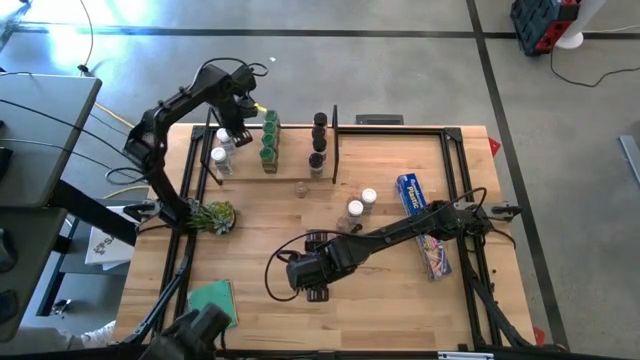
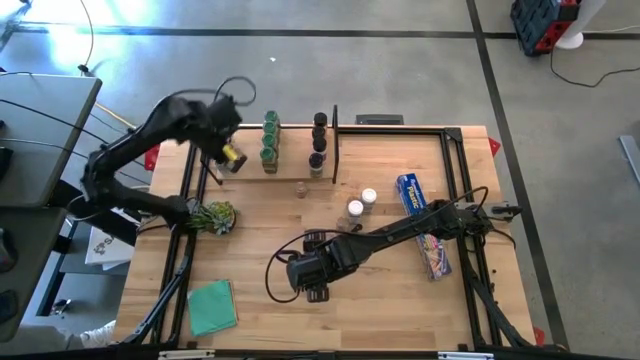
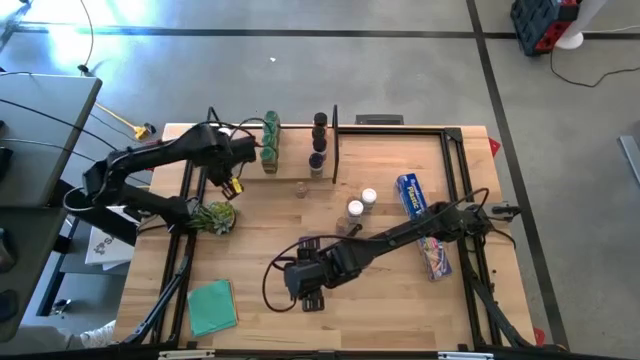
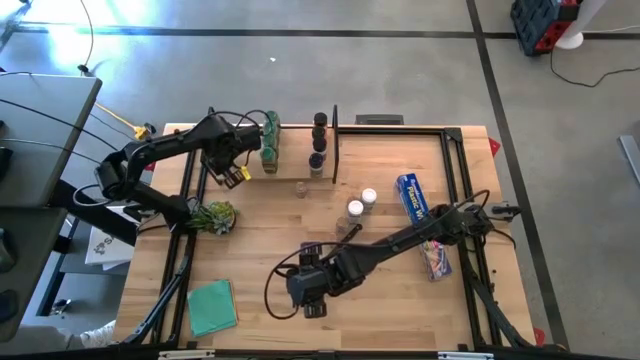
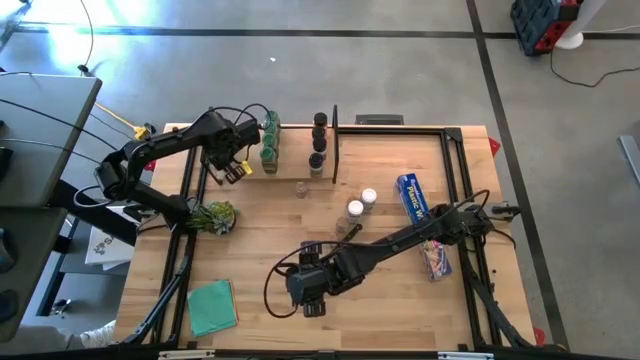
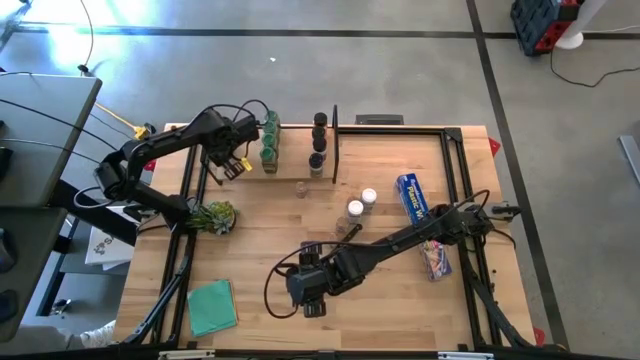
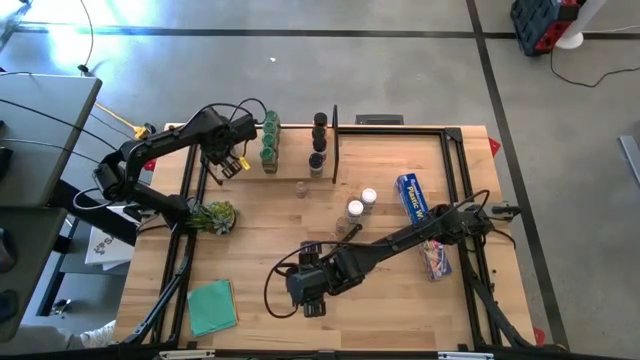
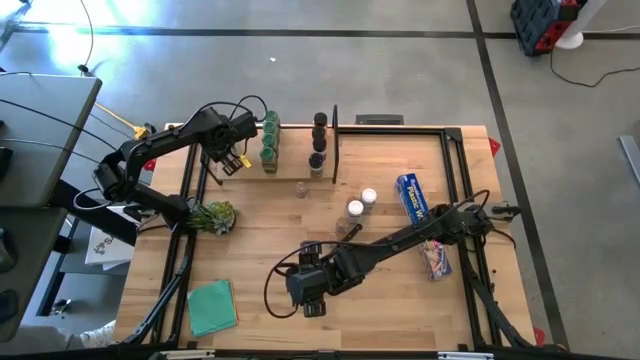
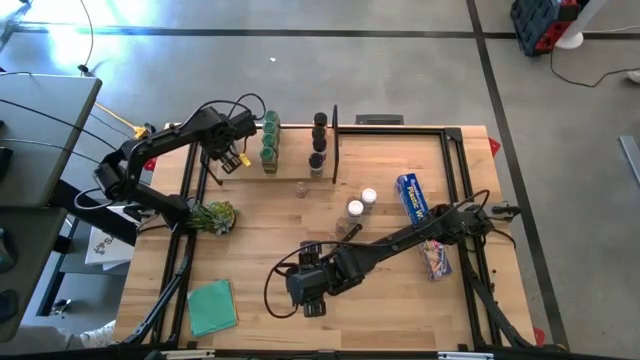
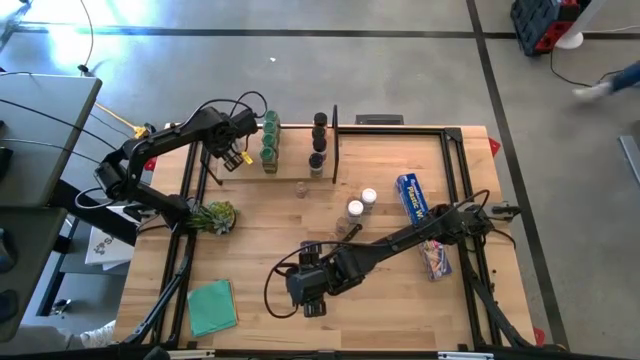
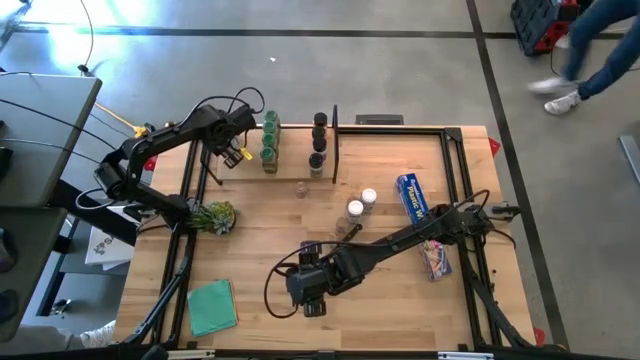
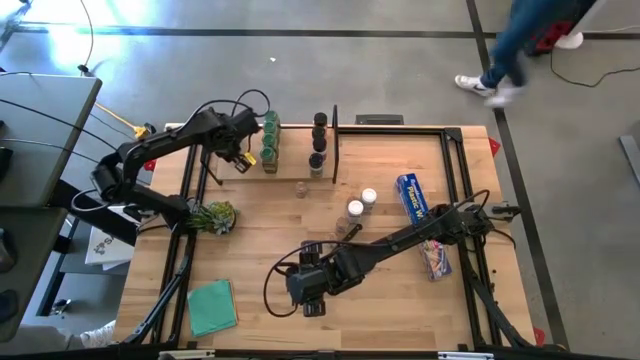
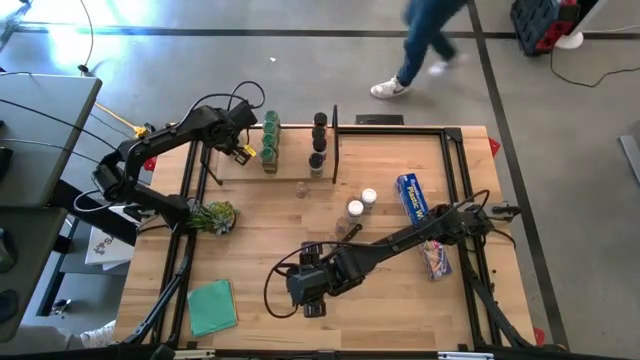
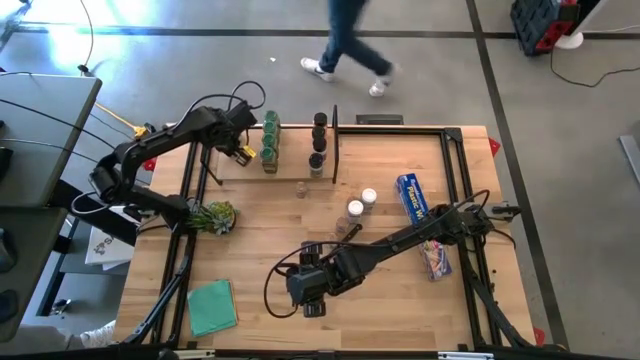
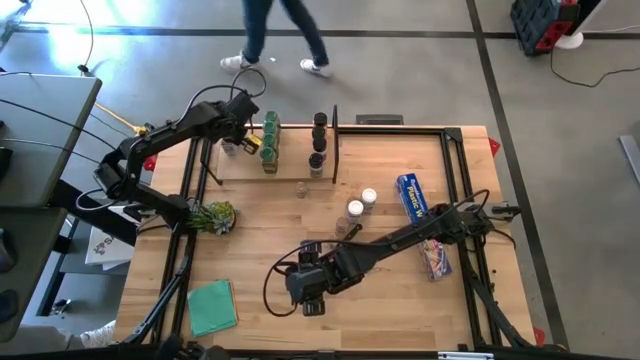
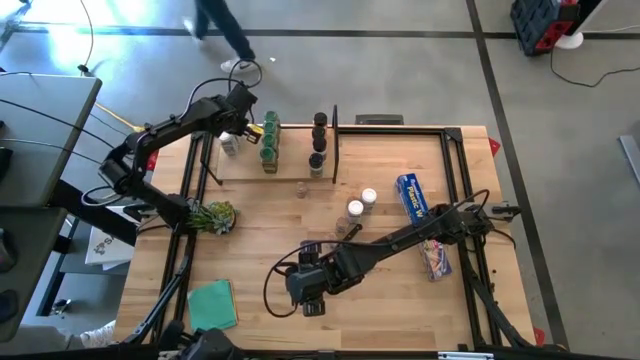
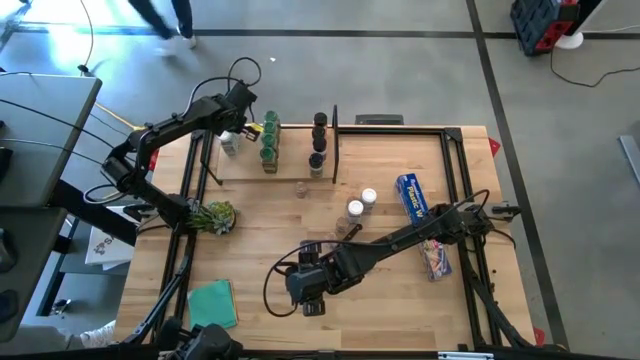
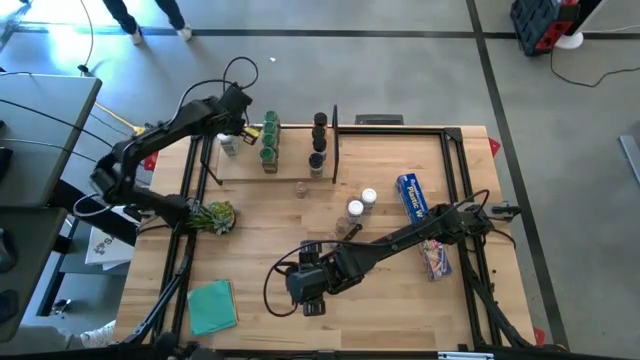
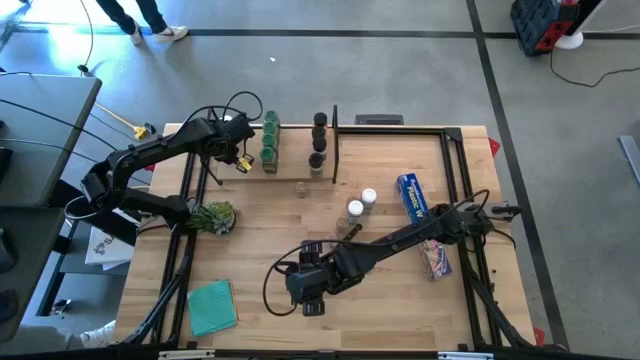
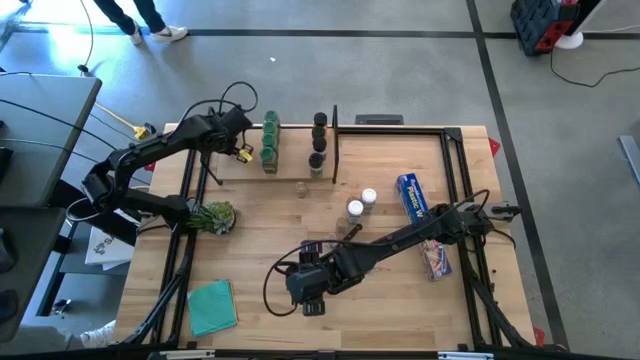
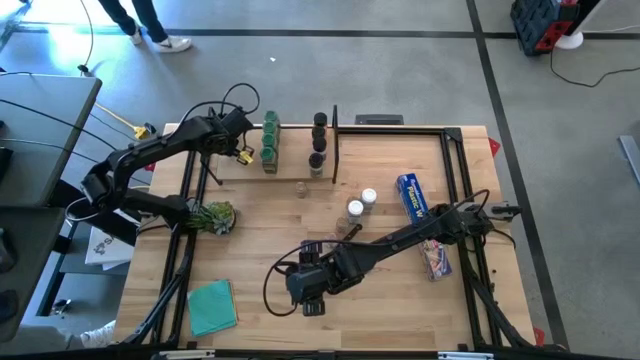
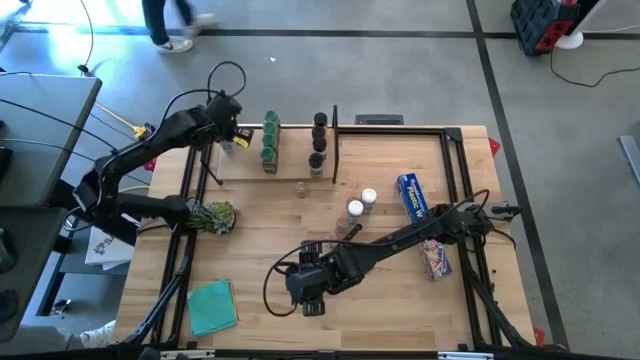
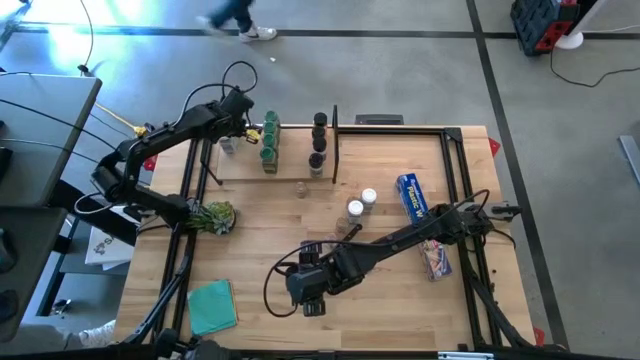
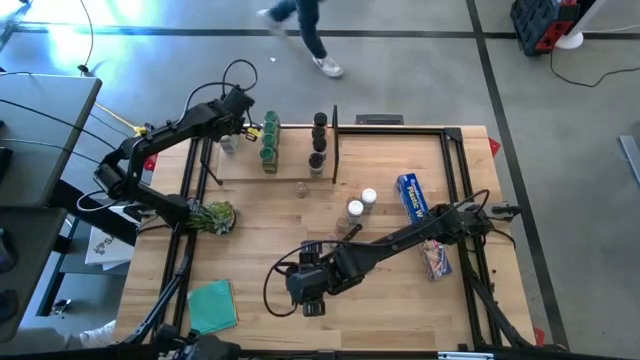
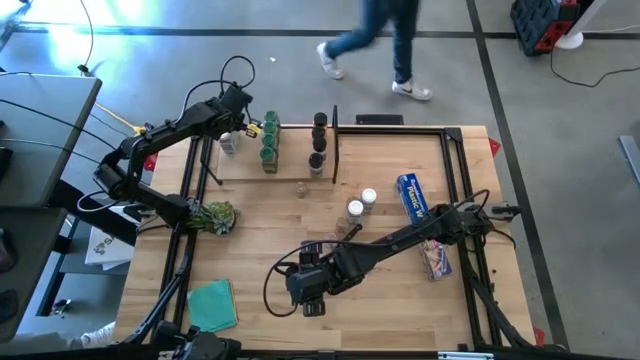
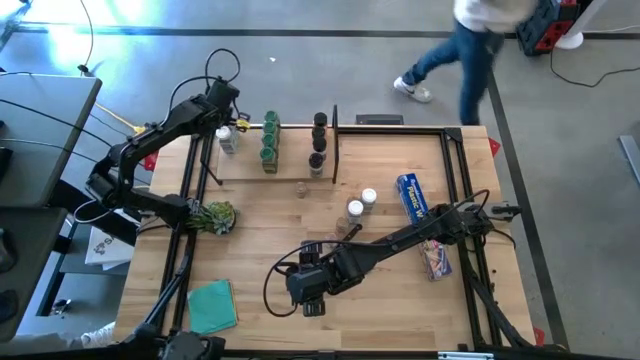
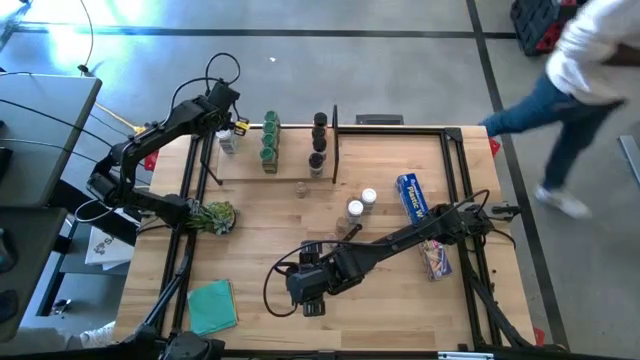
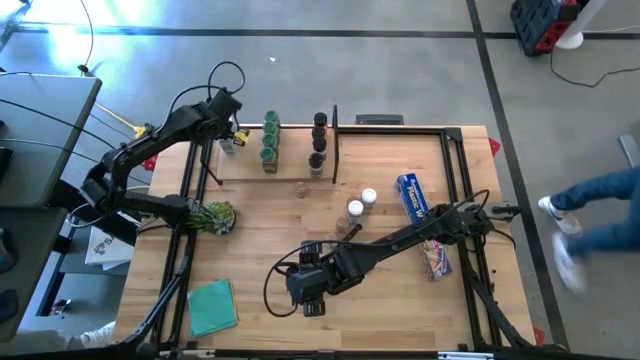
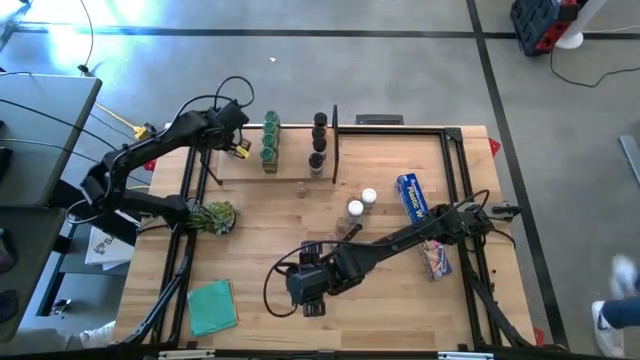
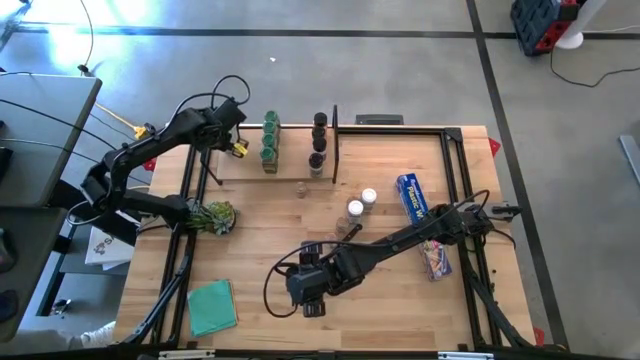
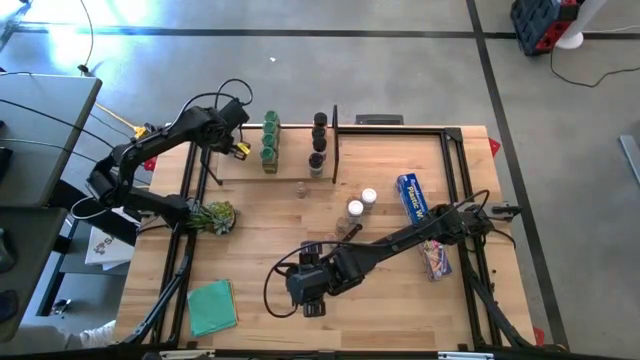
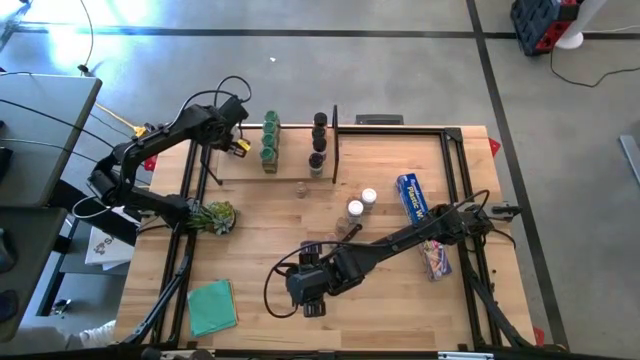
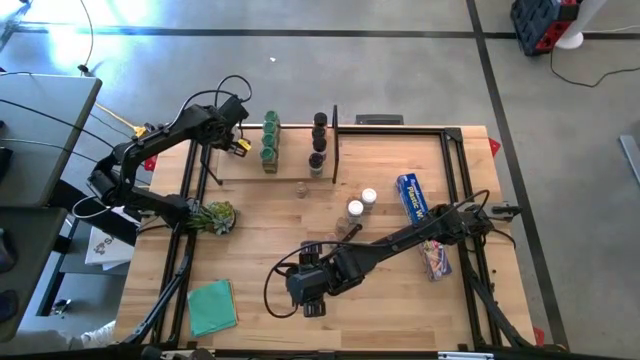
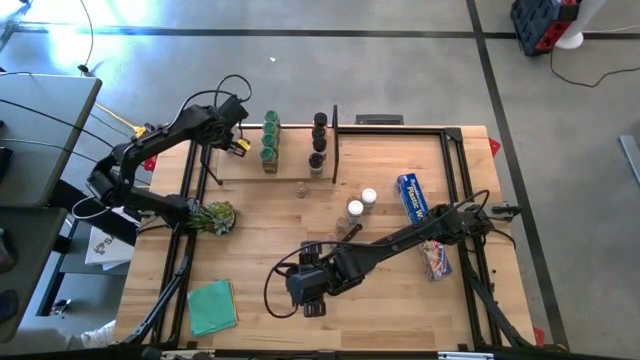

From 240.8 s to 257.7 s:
Task: Shelf spices
Adjust the white lid seasoning bottles

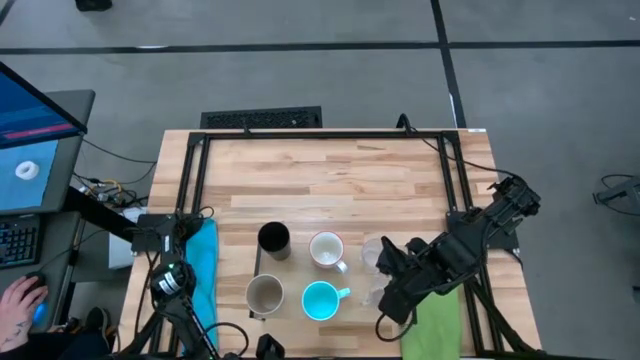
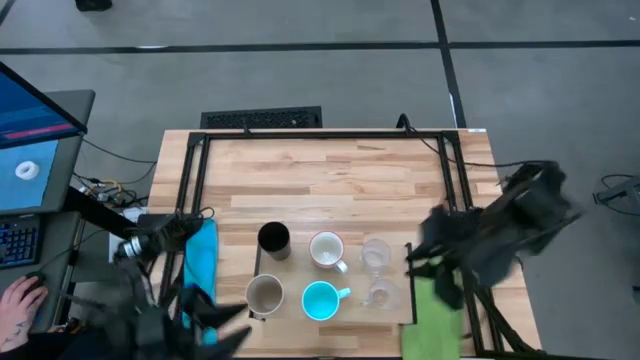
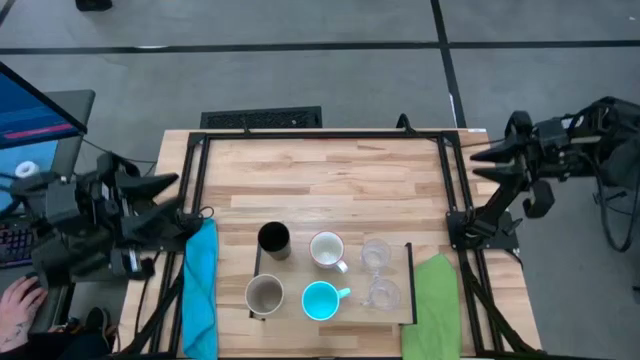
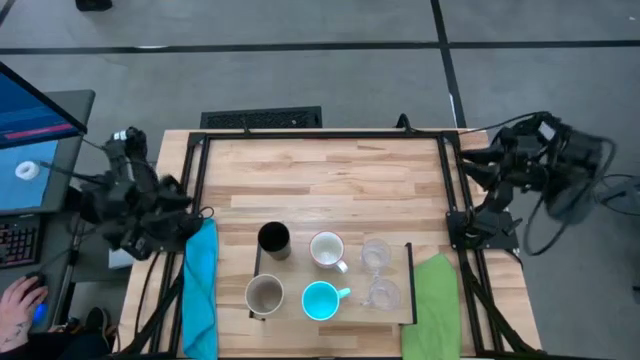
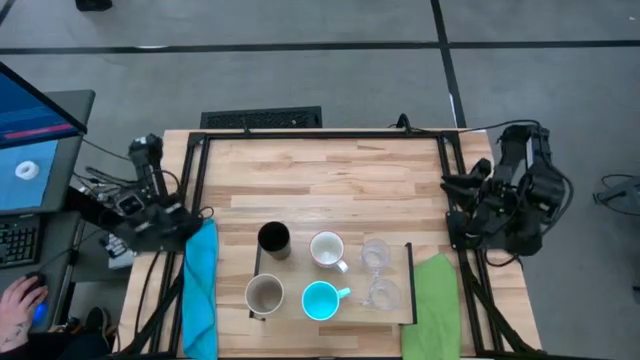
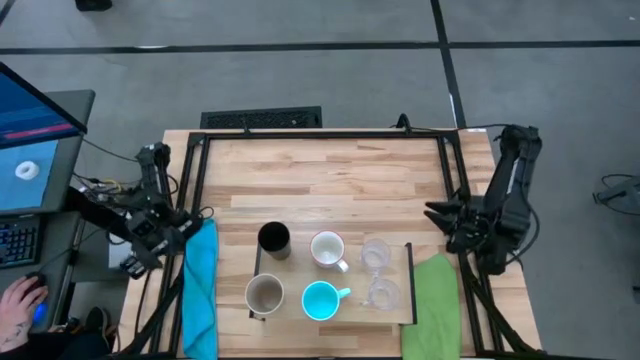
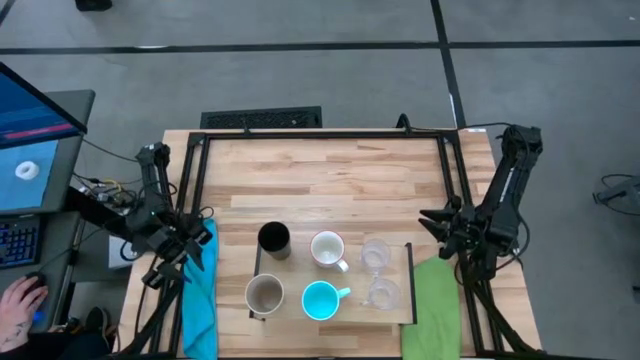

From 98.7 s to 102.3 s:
Task: Stack small to large cups/mugs on shelf
Return to Home Position
